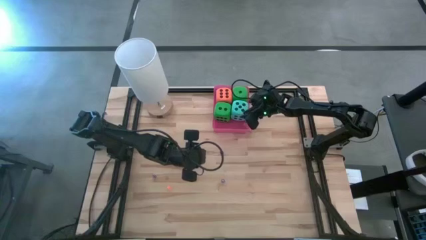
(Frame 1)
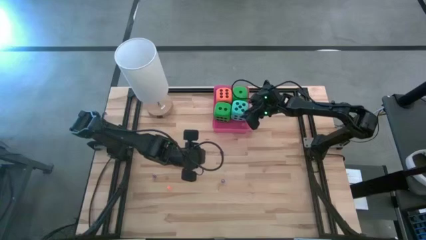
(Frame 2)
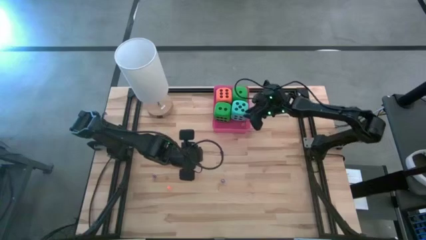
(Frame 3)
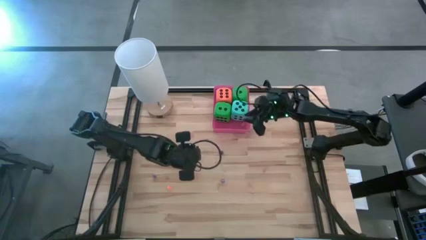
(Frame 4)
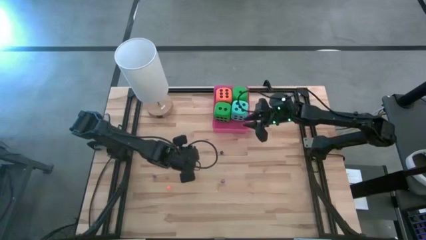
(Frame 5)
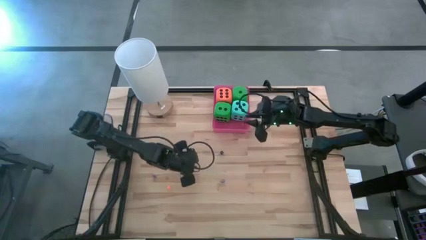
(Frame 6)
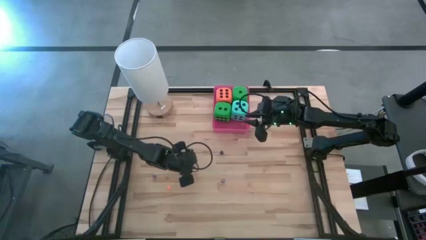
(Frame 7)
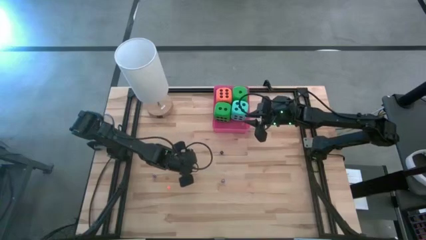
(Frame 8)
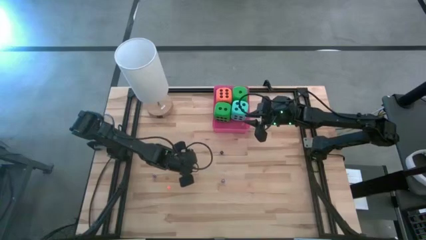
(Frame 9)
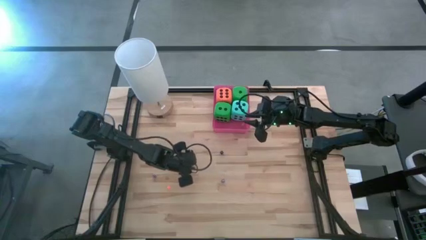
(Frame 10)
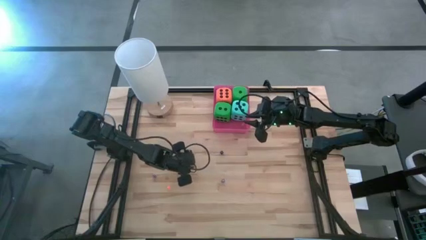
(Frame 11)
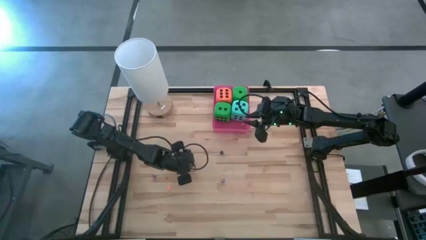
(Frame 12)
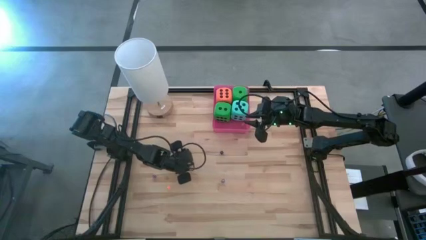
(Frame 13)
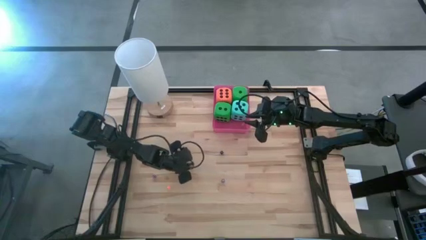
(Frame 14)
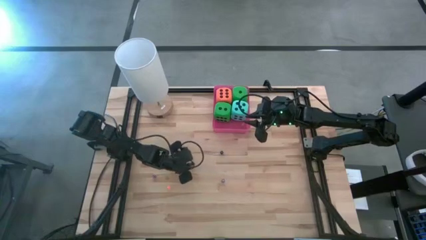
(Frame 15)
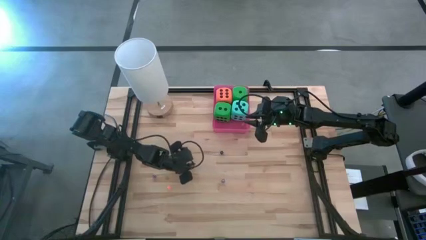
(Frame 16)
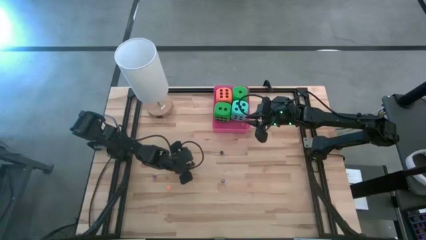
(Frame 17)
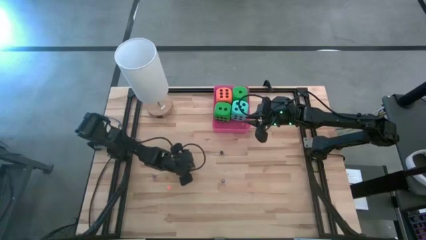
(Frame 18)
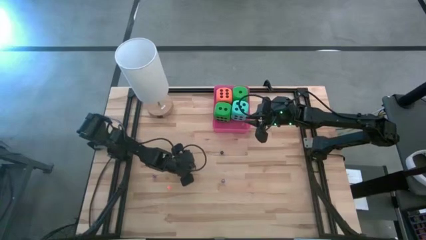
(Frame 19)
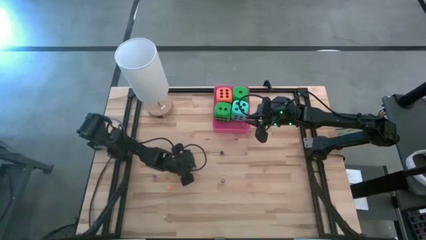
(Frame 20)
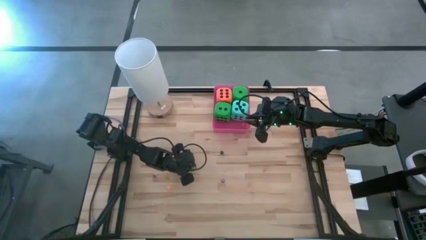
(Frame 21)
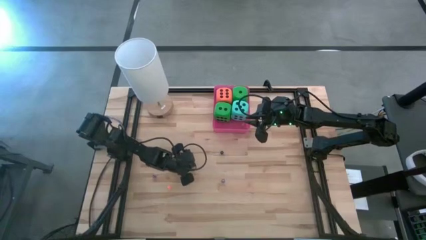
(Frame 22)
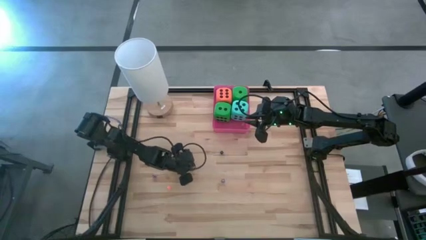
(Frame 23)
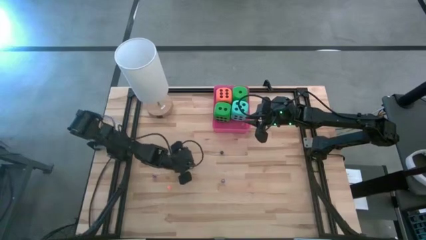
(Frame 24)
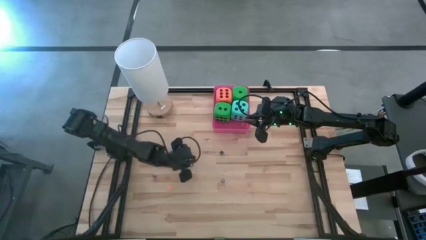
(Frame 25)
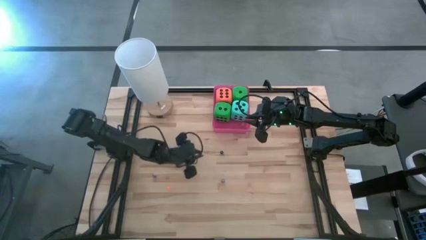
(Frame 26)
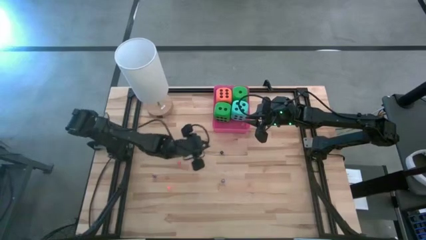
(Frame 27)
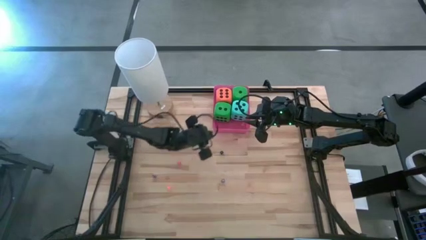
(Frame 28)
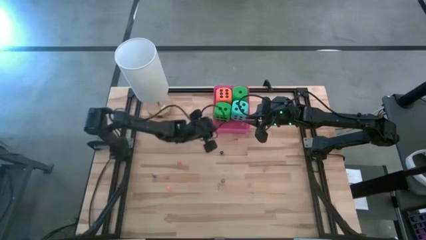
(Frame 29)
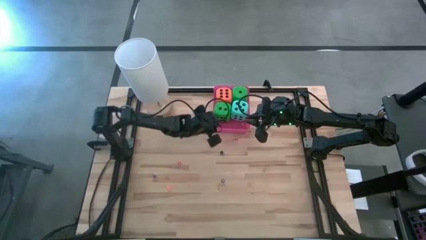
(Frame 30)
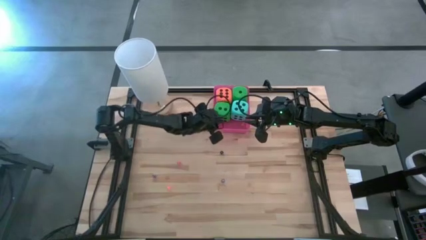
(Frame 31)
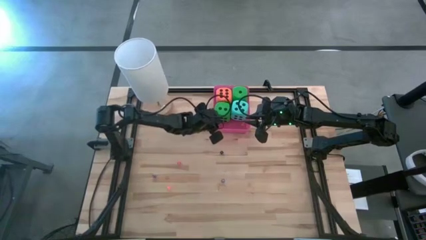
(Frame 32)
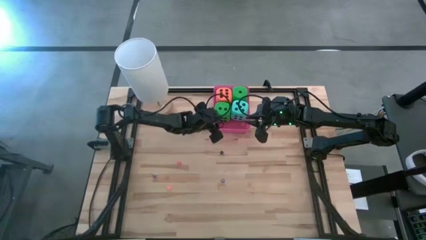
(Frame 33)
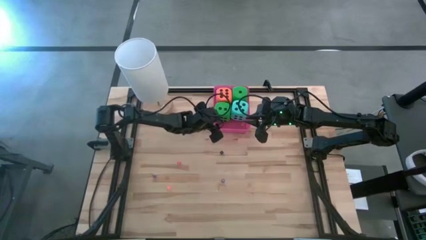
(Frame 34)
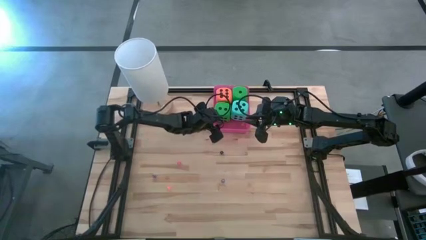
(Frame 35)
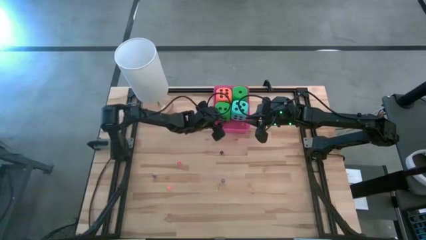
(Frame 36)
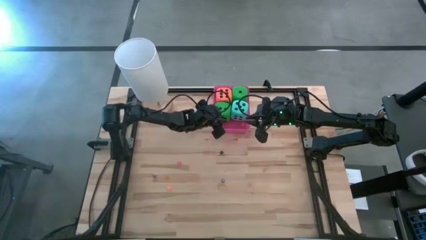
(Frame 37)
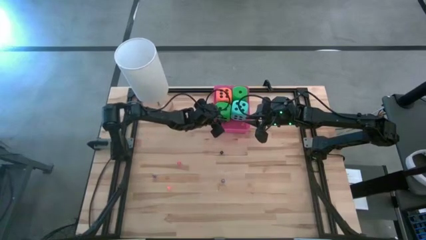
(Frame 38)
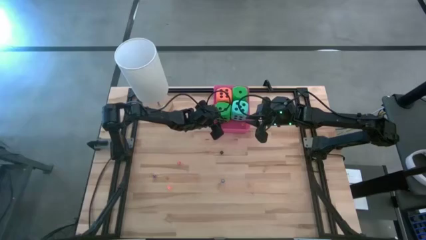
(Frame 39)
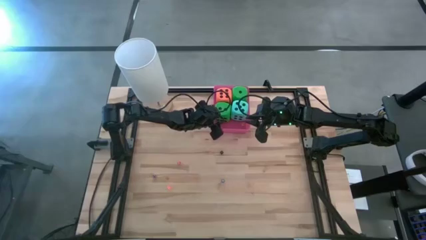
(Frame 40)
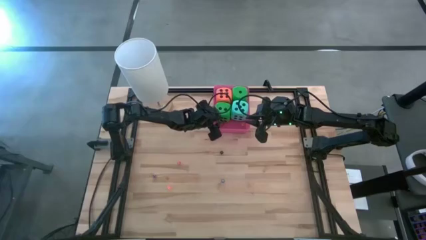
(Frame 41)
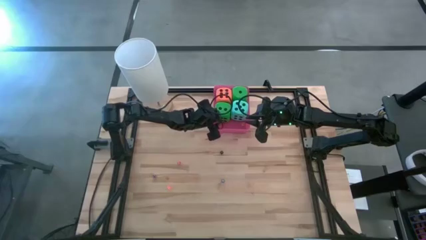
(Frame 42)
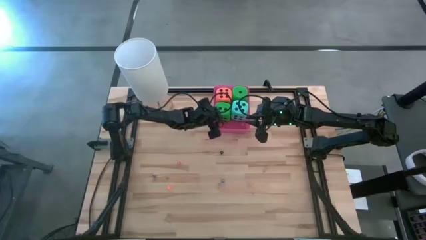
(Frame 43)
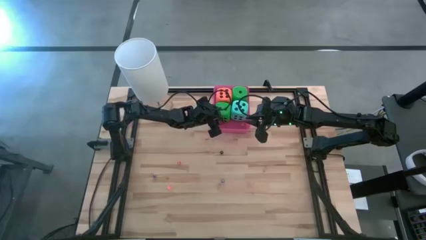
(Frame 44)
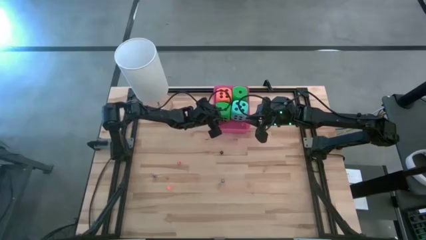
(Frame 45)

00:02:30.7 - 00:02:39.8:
Task: Pick & Place Dice
Put the left small black dice into the red container

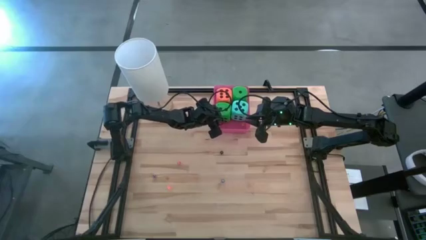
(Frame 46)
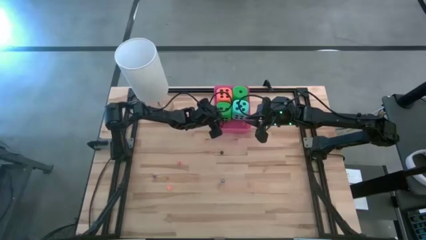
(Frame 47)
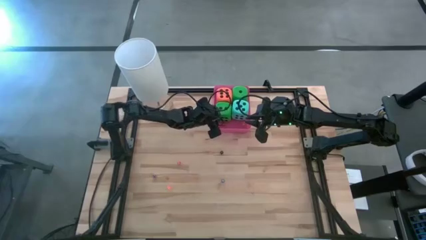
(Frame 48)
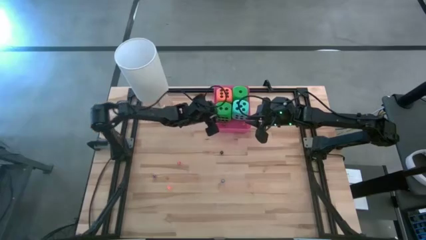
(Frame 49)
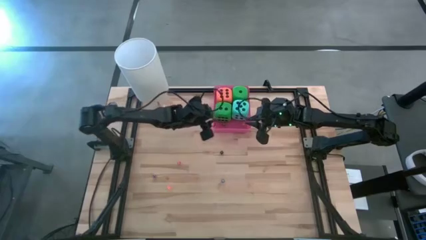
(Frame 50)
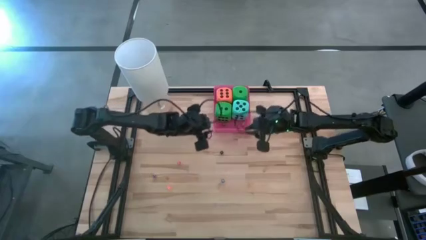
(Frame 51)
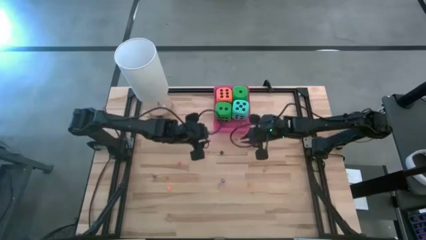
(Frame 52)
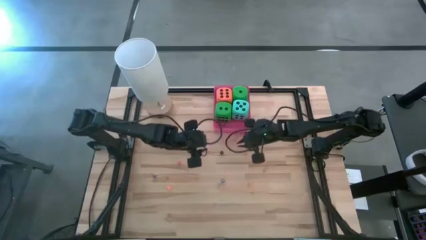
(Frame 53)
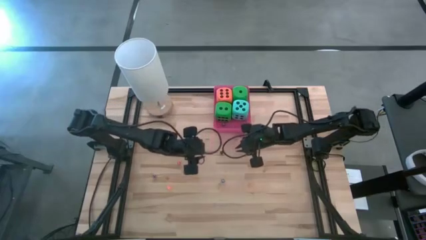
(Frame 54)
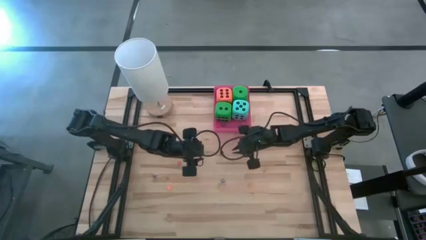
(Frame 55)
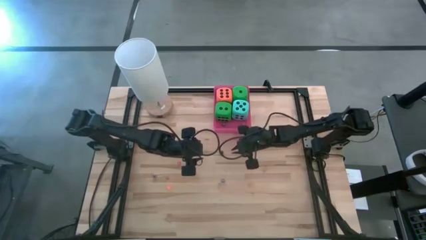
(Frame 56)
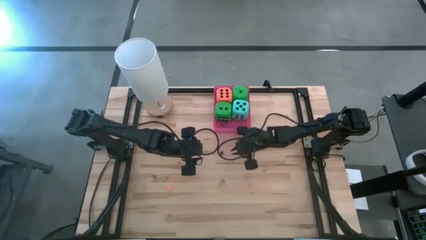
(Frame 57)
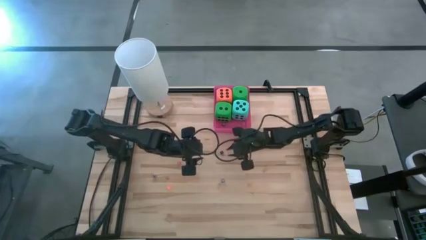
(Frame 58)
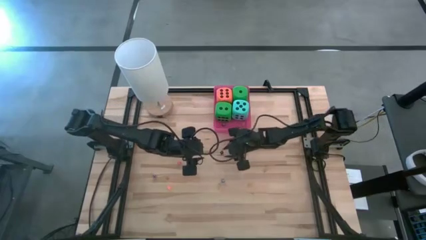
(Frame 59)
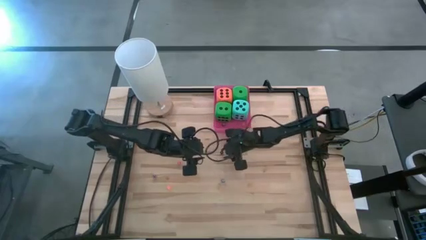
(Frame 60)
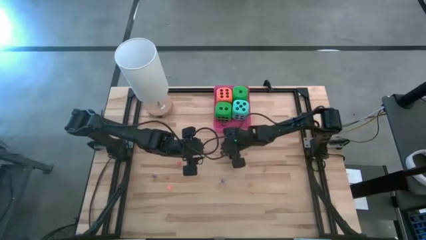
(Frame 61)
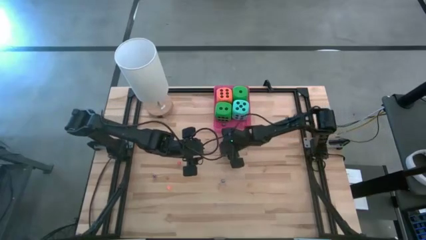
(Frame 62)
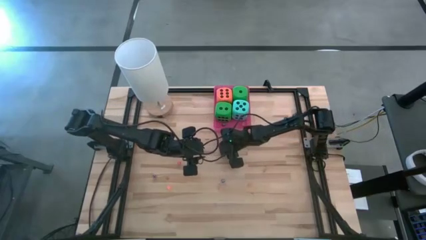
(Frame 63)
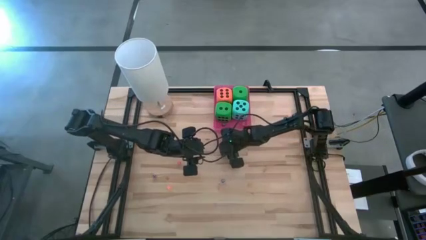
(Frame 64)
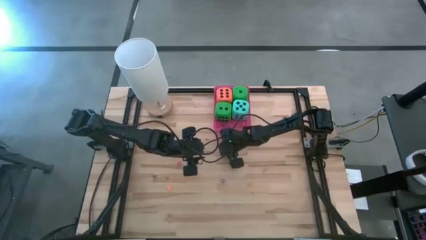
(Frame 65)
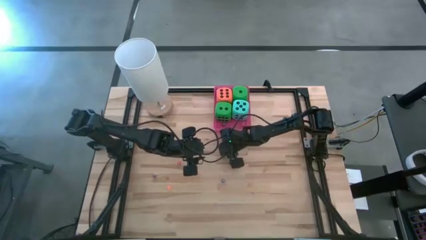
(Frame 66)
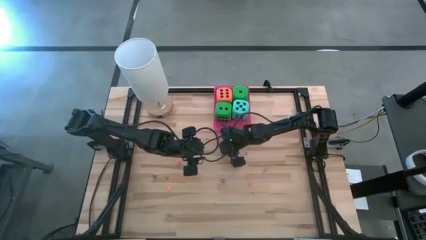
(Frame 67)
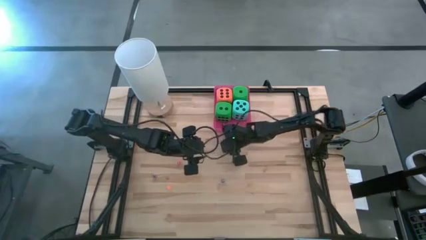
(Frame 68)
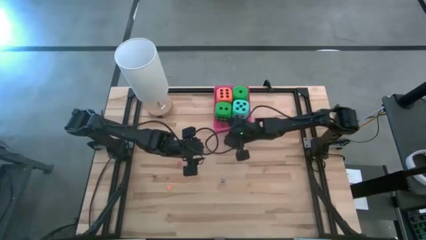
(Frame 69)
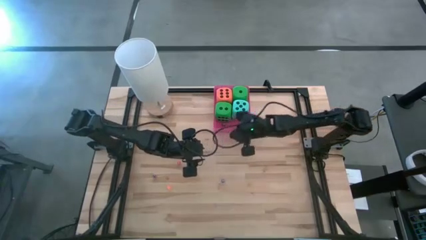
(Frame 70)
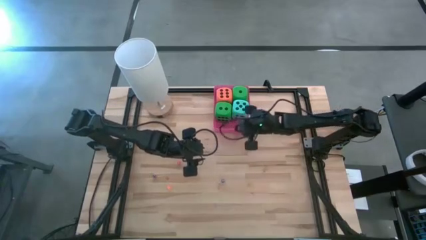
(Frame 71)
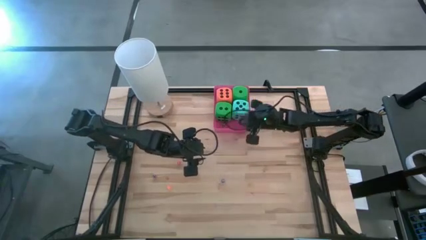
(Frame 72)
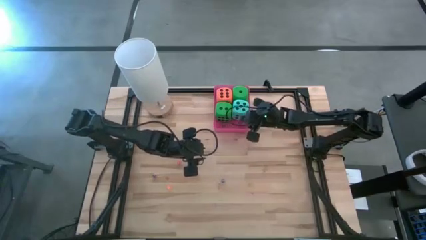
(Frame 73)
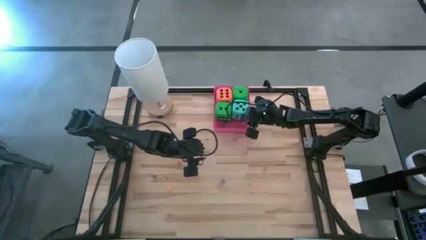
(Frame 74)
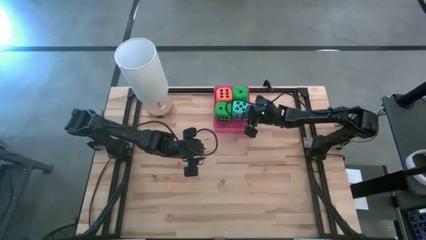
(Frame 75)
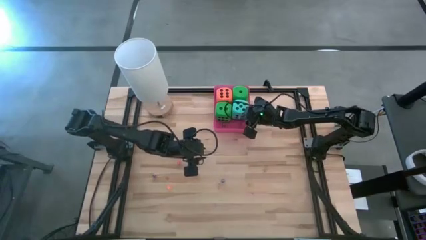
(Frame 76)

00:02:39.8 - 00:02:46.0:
Put the small black dice into the red container
